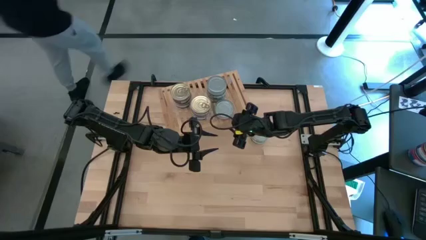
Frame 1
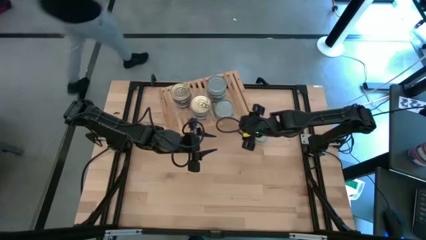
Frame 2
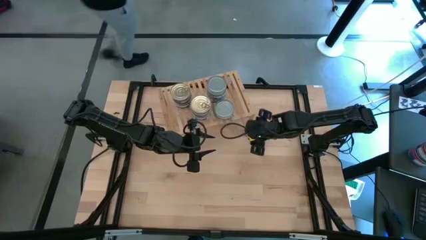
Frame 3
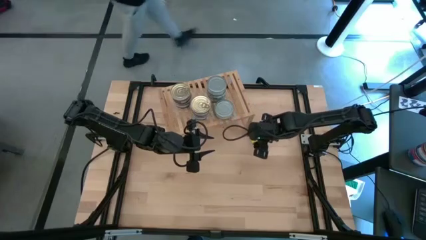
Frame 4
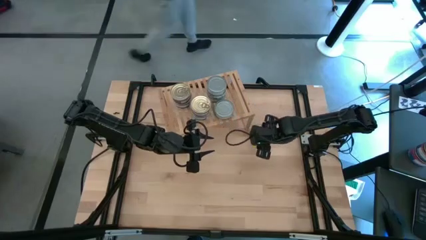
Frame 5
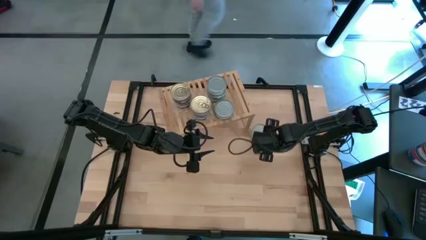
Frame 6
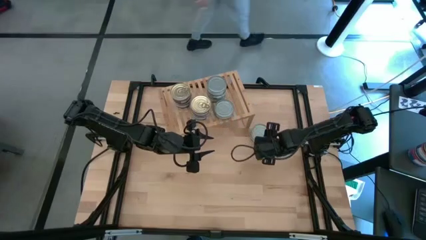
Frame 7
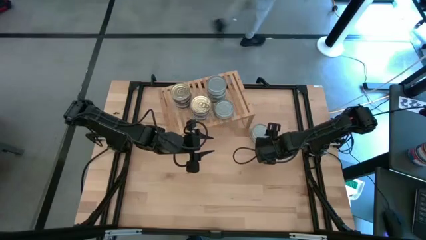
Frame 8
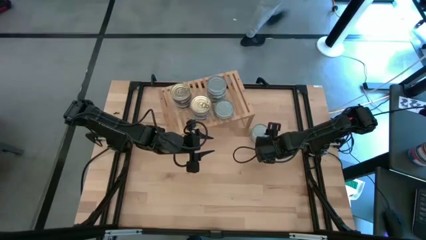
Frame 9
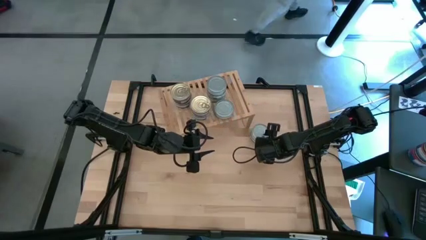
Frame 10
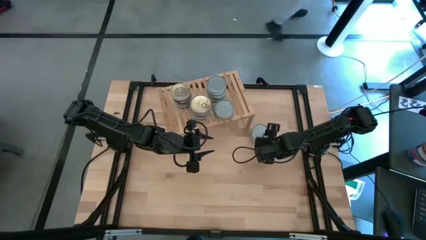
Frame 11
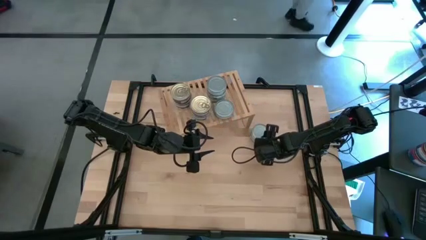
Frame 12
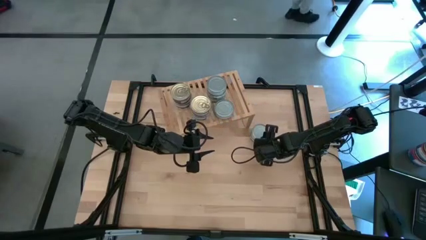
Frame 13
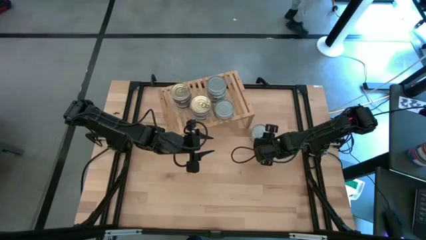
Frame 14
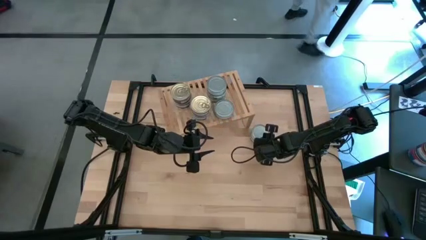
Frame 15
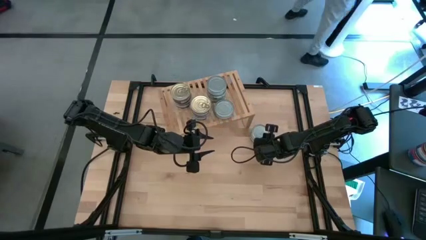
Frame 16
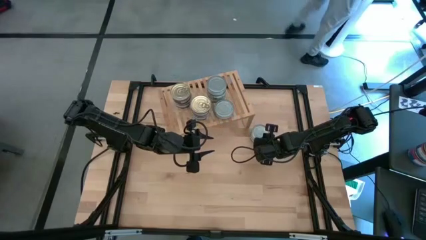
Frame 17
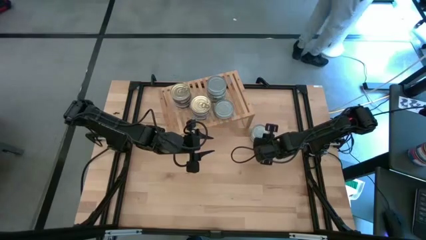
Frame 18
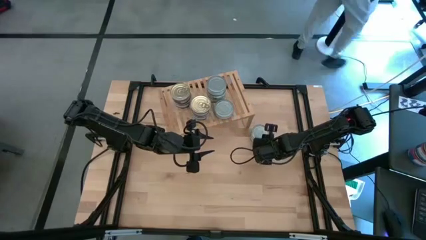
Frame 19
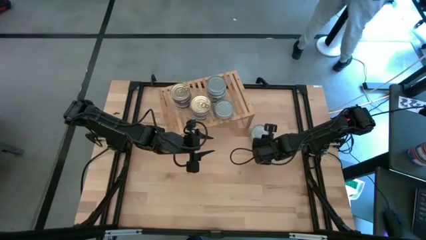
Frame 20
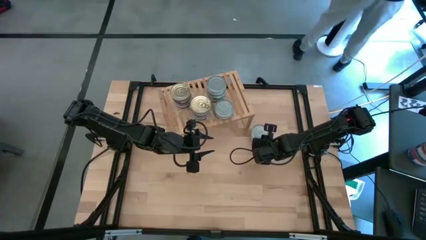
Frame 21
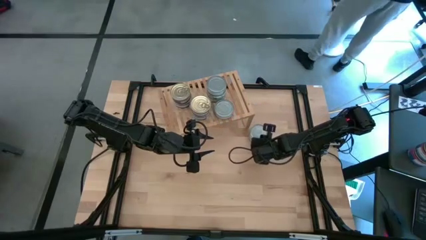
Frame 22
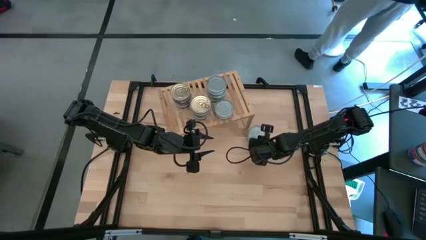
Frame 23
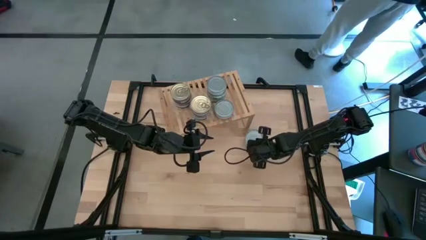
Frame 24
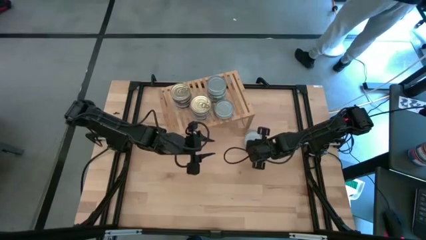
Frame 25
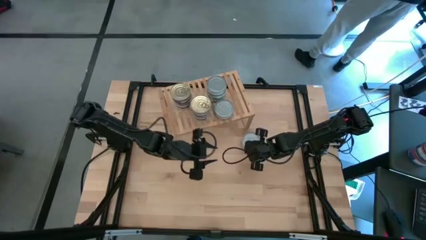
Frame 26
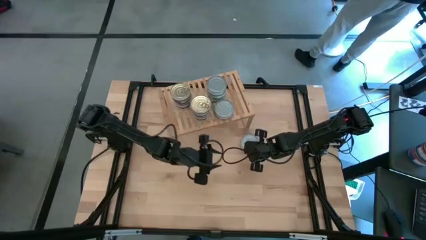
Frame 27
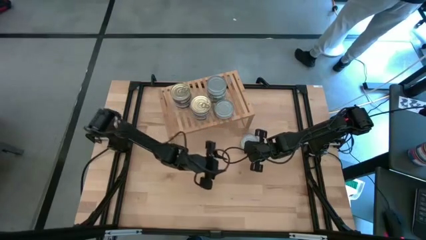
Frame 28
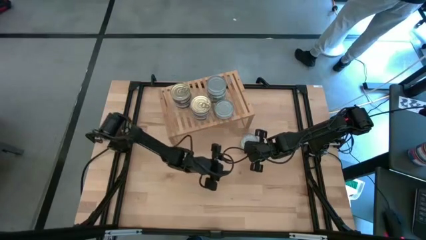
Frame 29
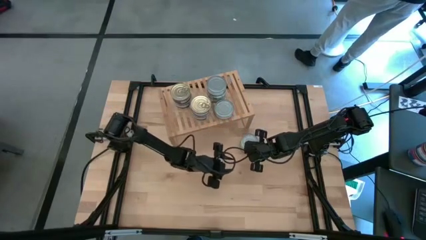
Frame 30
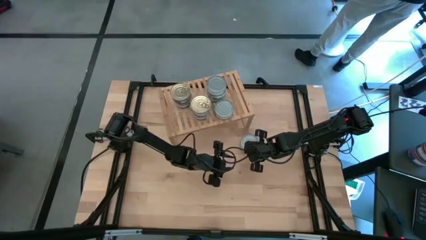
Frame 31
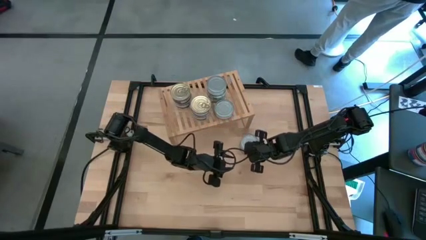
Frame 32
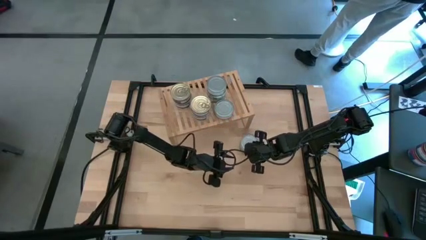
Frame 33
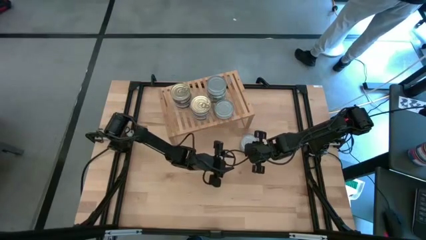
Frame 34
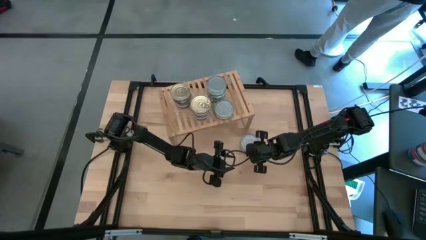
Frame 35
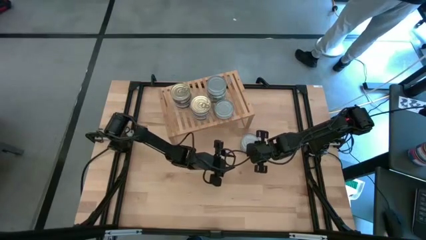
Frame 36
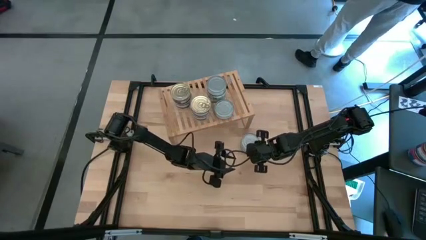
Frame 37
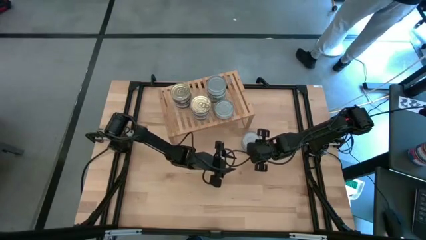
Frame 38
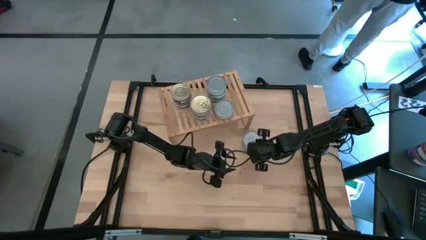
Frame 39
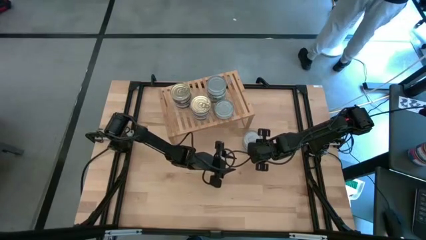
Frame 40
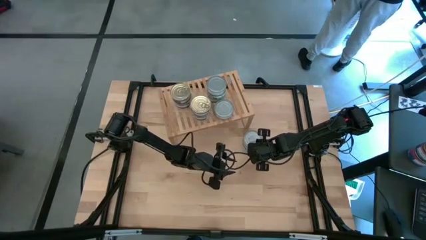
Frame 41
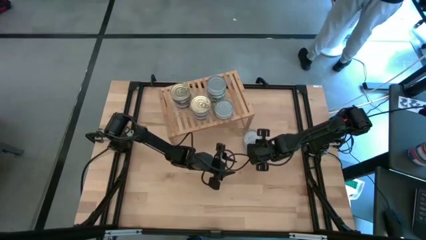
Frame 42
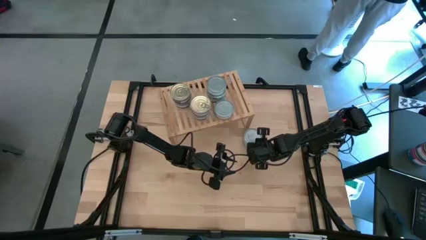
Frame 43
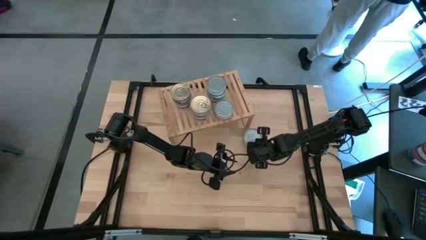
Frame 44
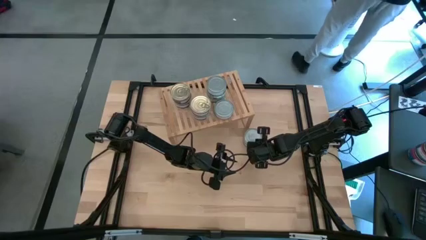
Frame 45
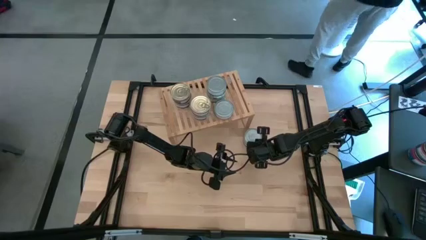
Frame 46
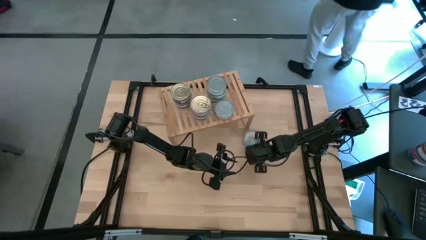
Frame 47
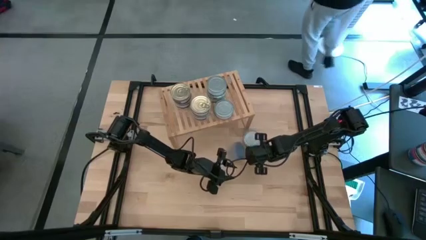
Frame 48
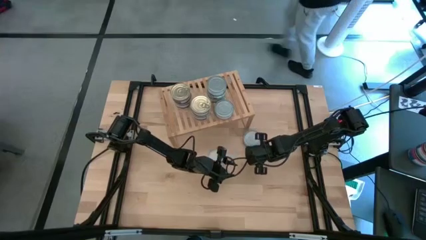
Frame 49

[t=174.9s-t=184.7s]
Task: Stack canned seafood by type on shelf
Stack the green tuna can on top of the green tuna can on the shelf

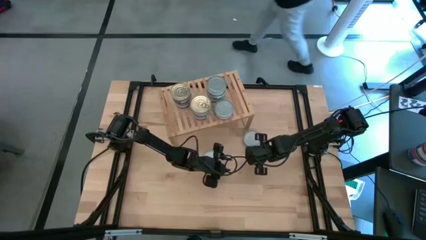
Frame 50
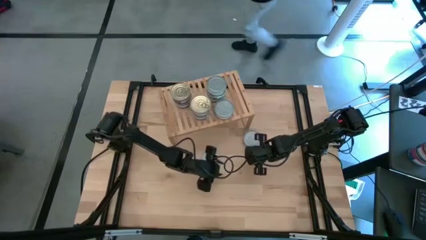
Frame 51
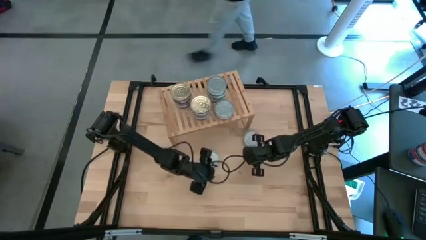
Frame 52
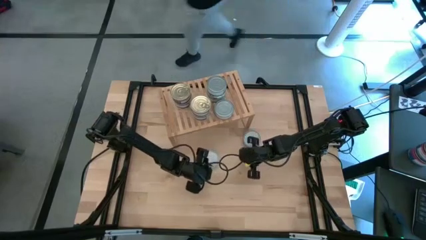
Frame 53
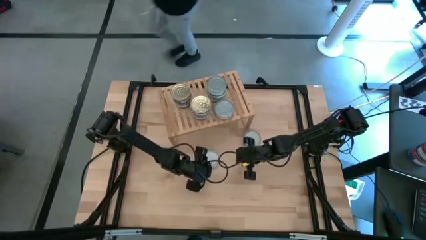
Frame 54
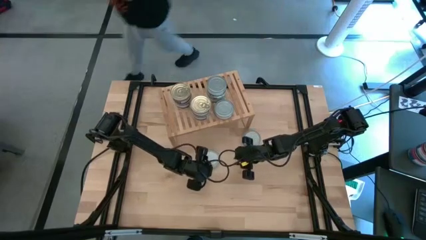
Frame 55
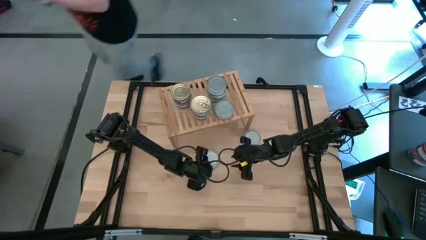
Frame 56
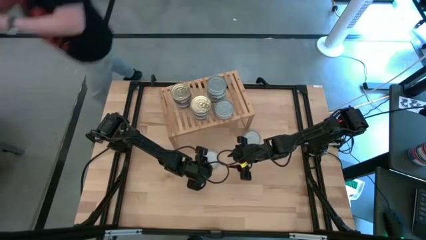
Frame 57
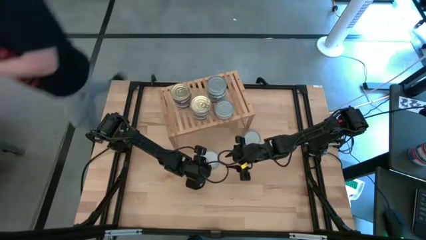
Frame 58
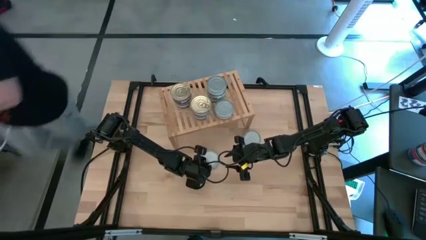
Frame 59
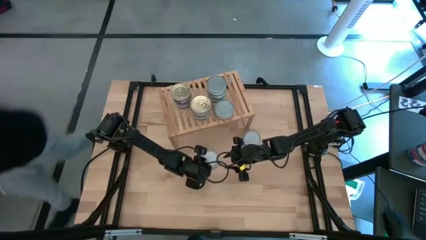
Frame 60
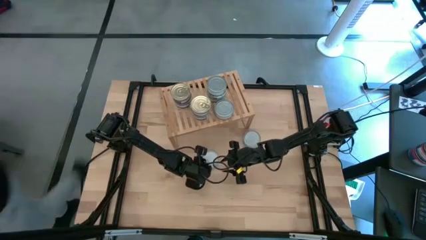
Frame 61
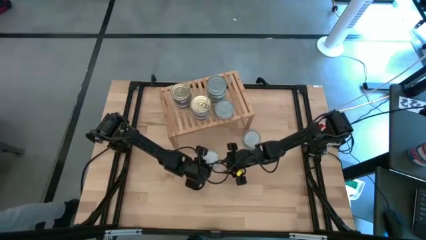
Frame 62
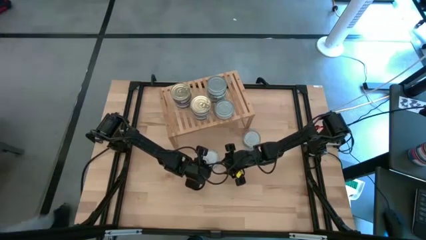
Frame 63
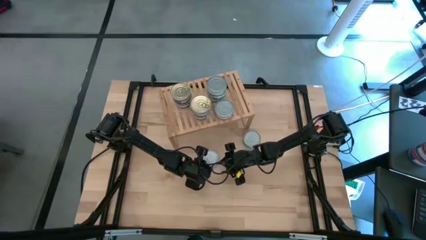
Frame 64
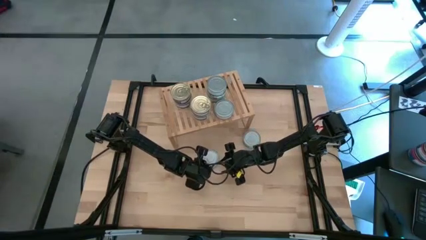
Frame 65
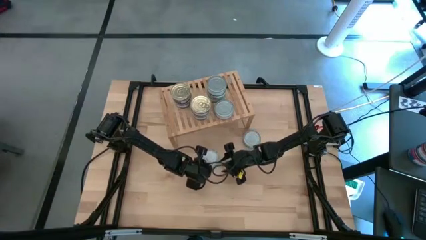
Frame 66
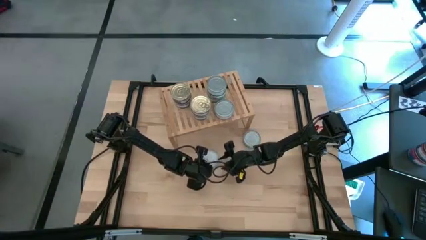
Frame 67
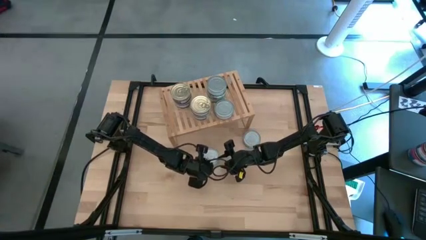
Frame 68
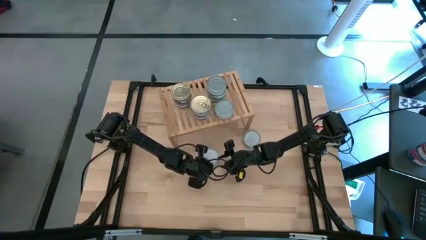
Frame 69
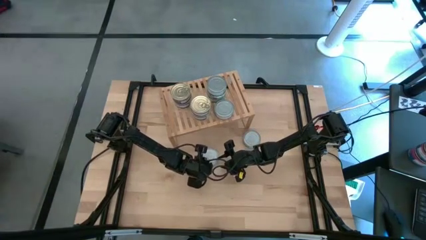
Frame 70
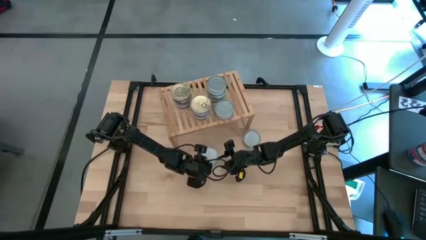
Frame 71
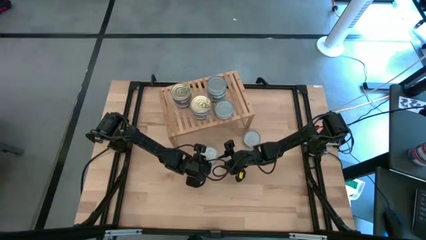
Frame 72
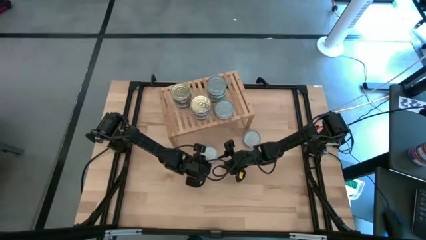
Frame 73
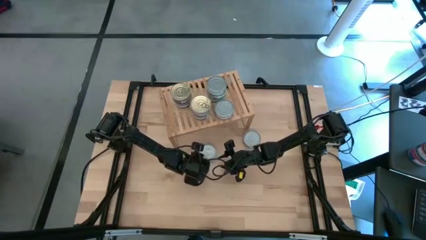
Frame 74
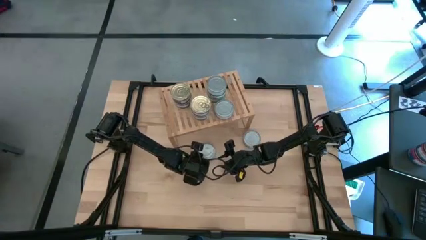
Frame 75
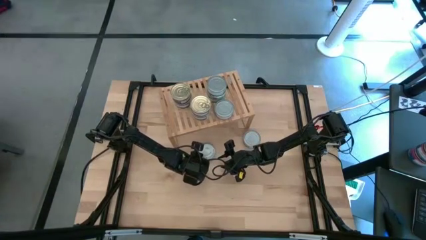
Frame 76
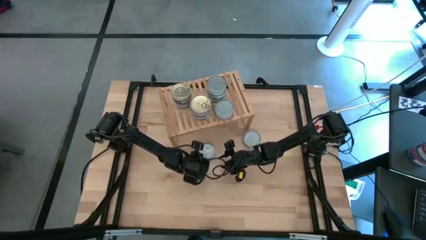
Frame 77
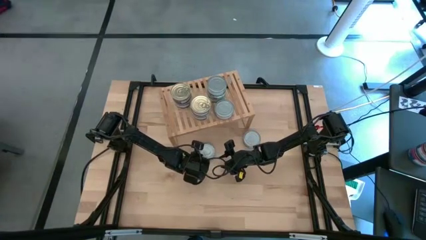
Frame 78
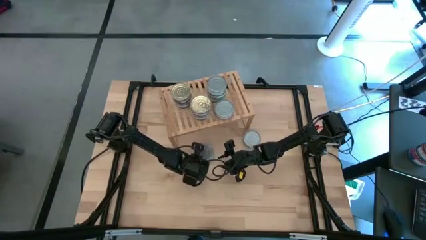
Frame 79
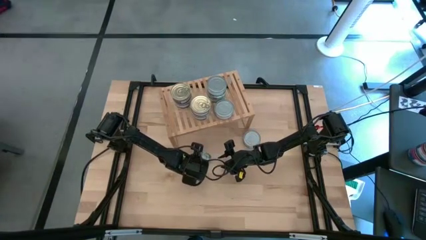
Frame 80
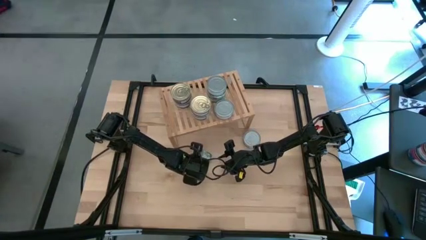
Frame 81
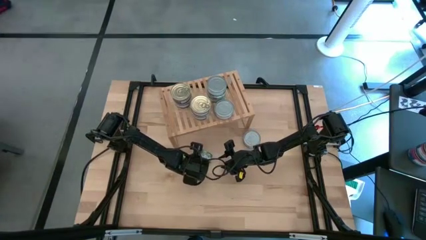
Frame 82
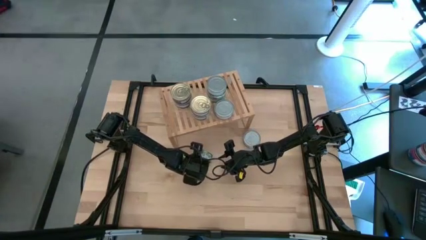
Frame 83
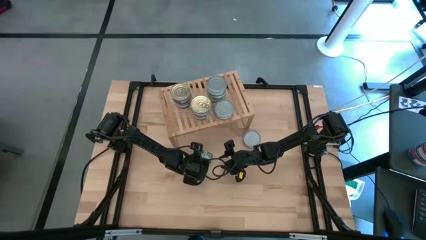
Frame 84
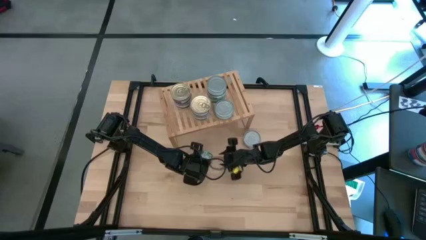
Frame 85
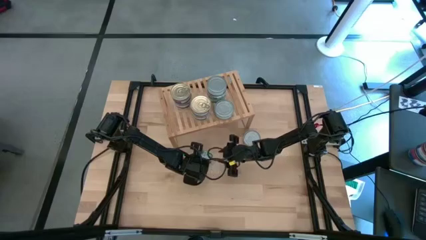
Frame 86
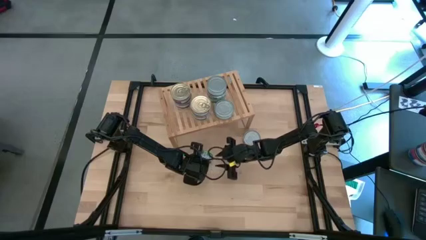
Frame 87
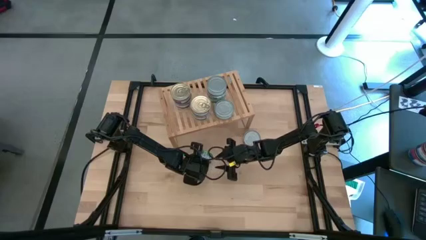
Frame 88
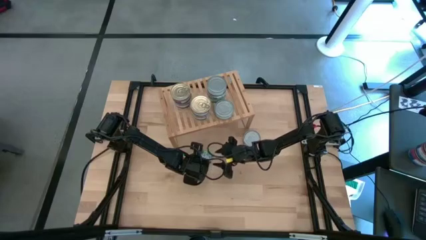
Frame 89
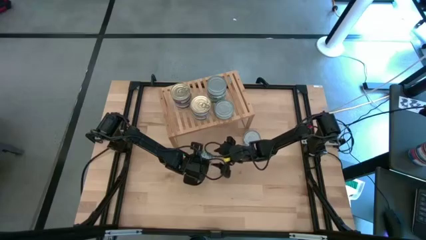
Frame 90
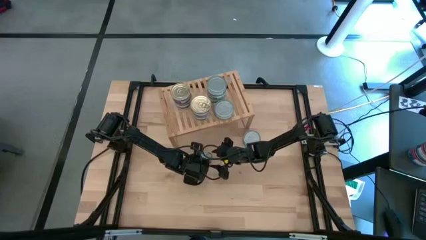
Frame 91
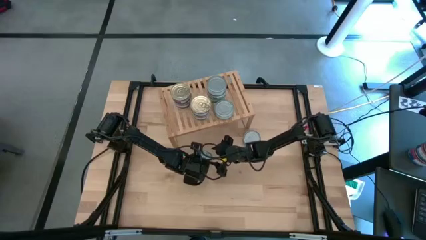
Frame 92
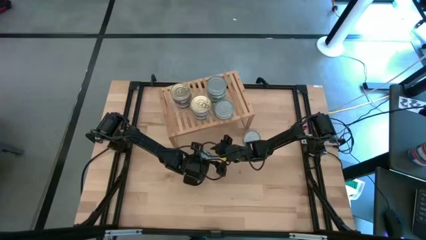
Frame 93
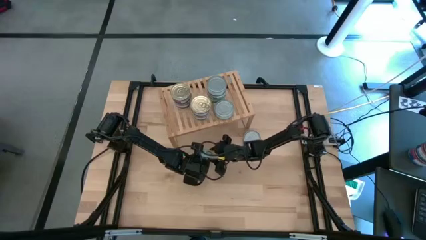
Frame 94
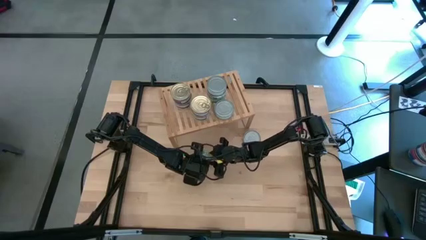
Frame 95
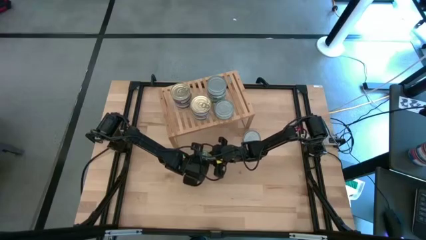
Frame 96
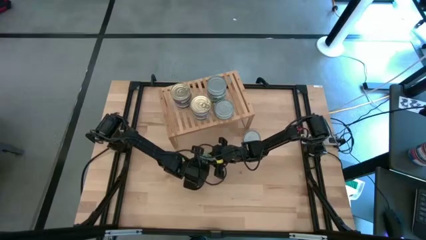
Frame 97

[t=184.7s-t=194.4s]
Stack the green tuna can on top of the green tuna can on the shelf
